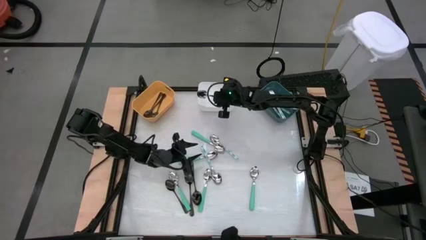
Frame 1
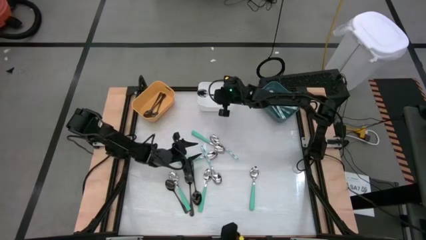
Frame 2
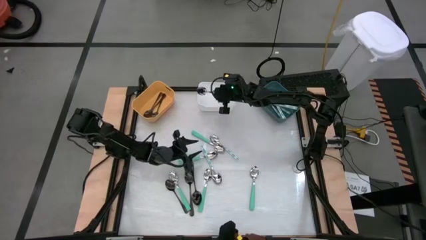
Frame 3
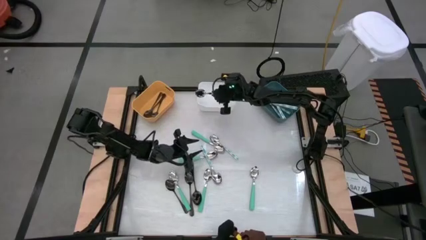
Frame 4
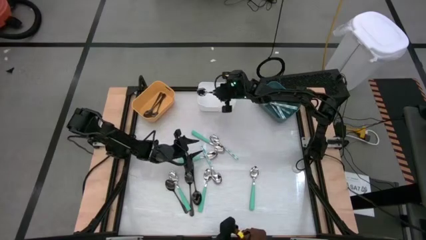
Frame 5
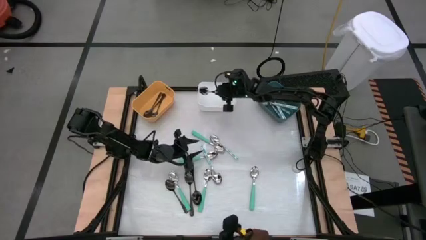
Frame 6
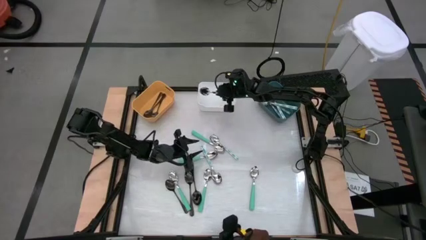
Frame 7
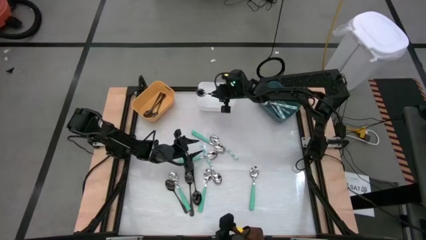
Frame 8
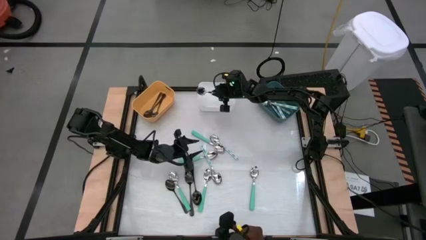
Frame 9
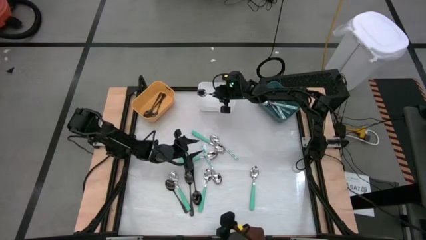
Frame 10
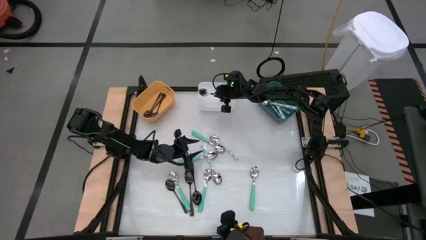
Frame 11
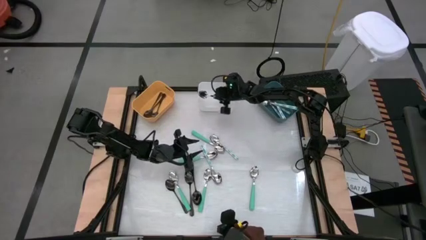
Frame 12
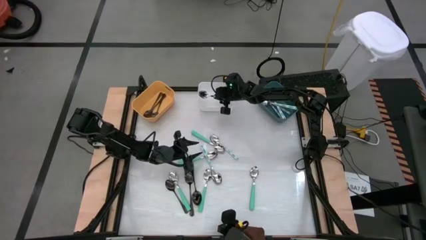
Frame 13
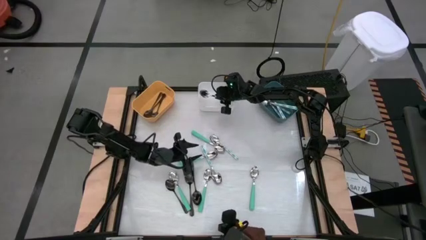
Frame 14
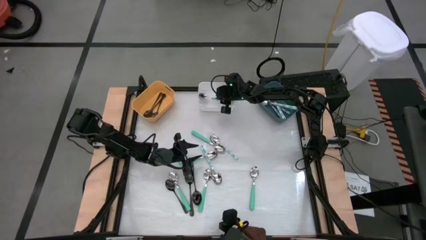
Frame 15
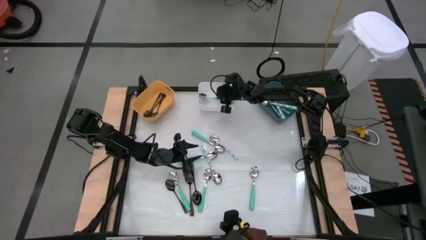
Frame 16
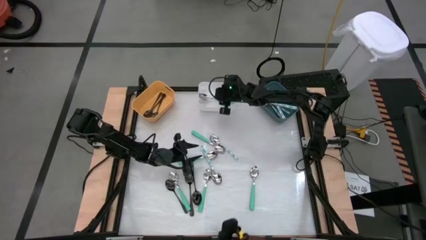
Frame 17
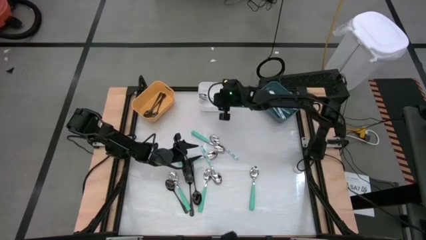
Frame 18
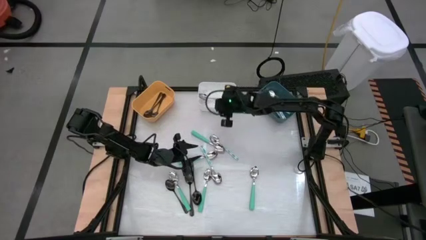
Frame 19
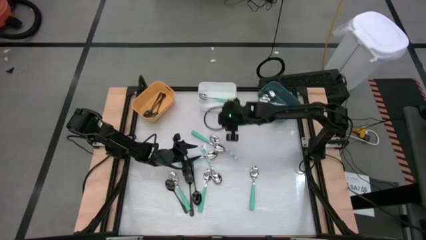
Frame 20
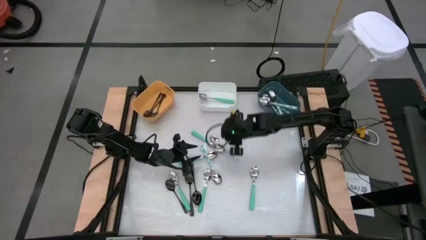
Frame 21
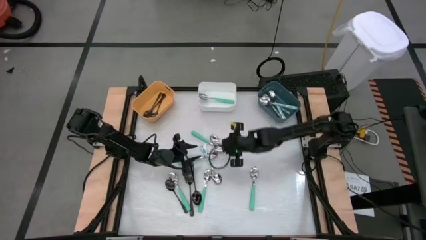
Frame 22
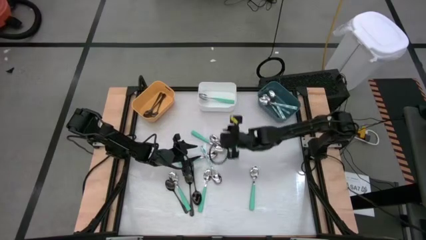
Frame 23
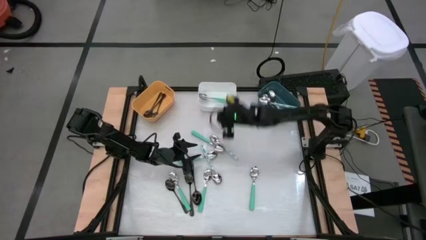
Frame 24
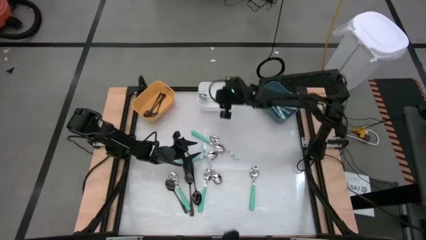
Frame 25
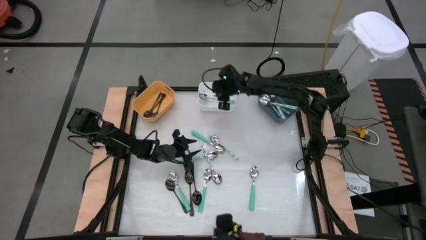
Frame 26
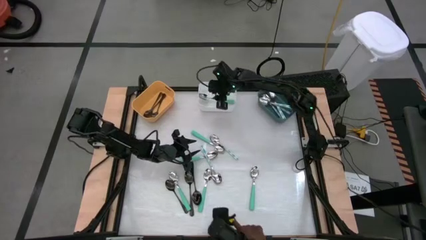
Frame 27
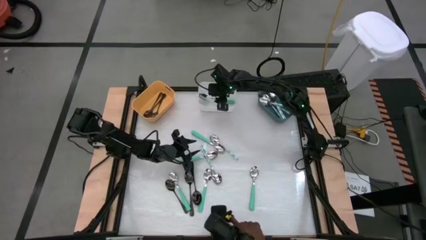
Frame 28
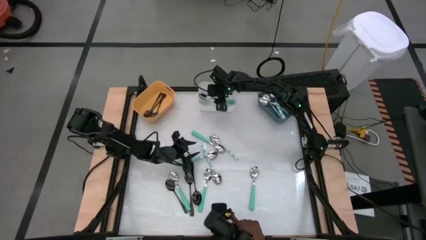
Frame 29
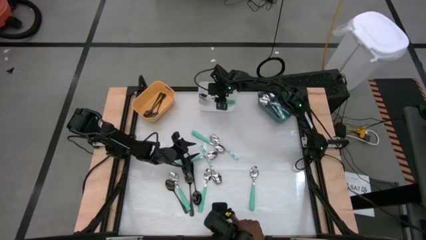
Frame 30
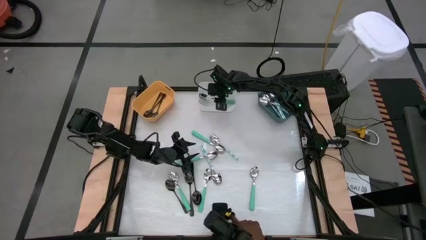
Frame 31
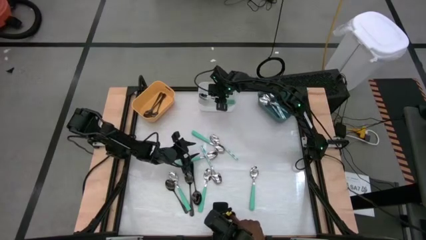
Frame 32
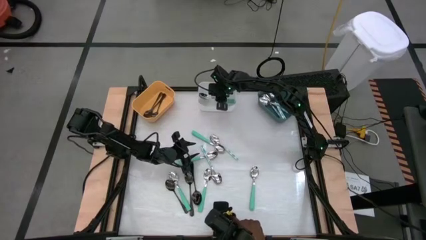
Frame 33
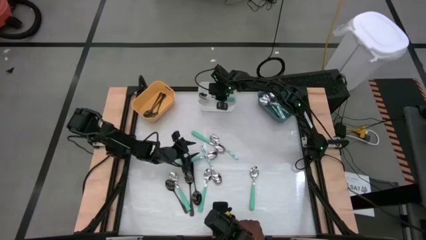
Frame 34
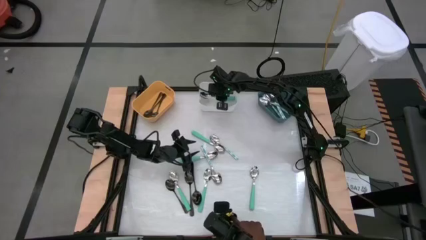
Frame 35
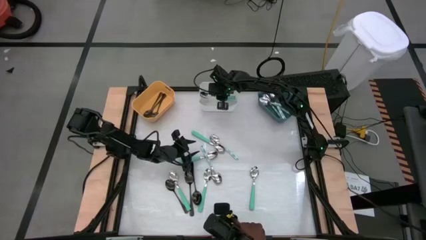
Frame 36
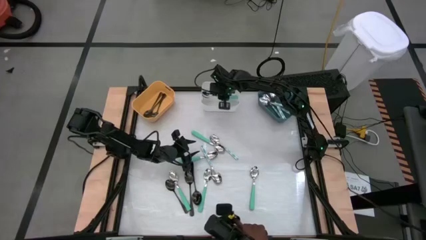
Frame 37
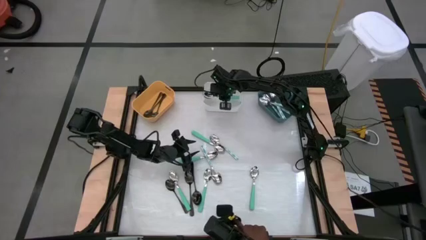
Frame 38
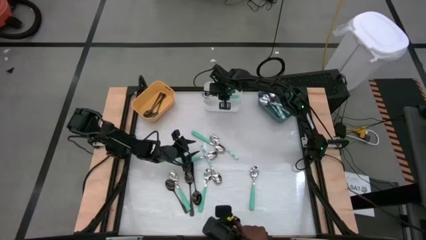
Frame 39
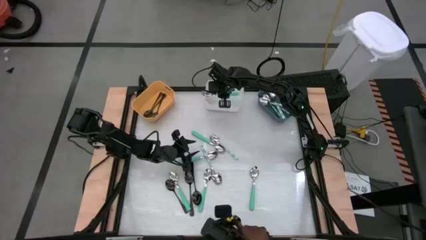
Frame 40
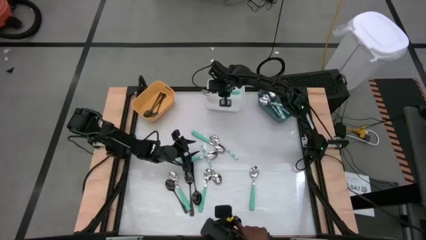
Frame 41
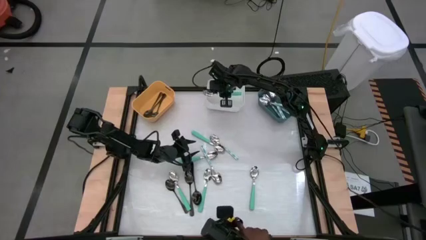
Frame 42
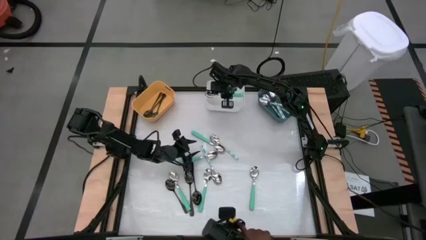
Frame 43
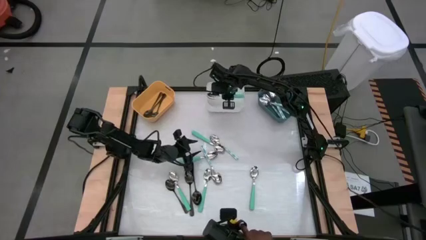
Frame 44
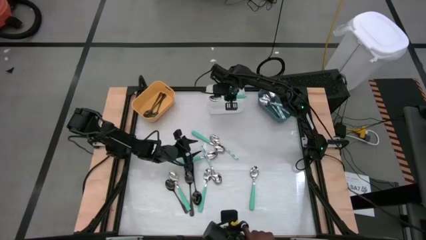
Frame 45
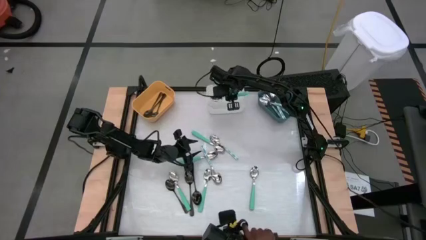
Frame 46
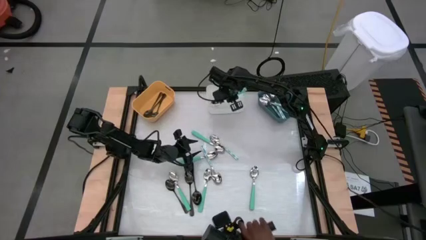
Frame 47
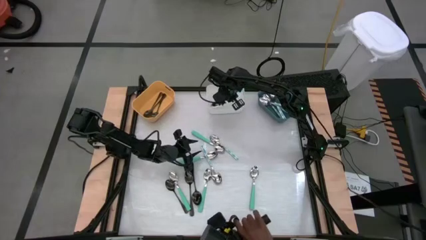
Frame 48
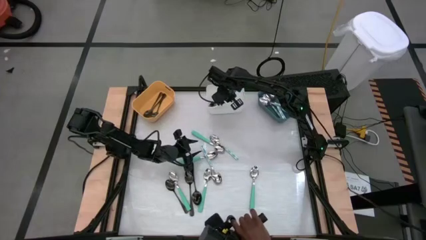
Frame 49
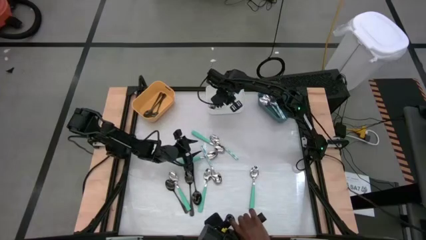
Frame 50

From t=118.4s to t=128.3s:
Task: Sort silverware by color (type)
Put the blue spoon into the white bin

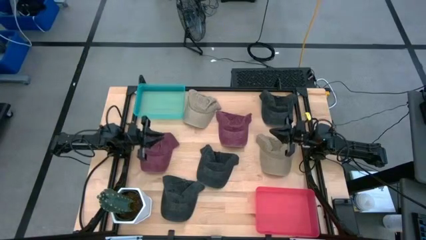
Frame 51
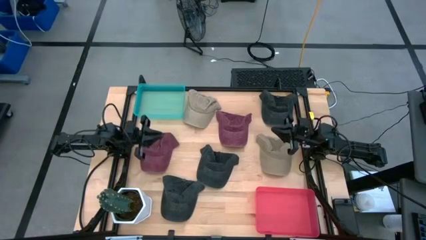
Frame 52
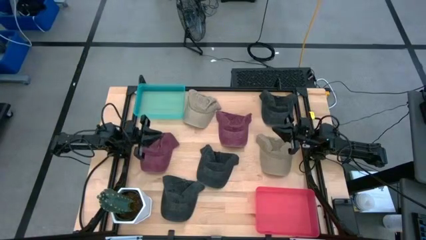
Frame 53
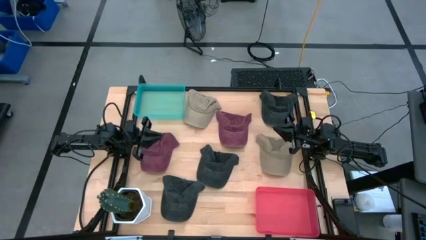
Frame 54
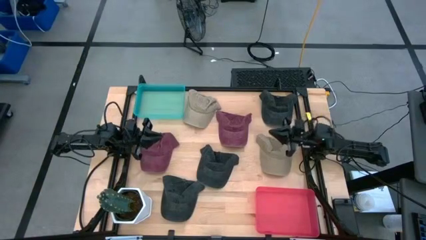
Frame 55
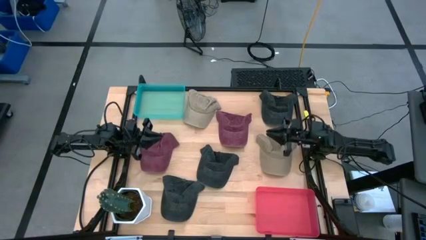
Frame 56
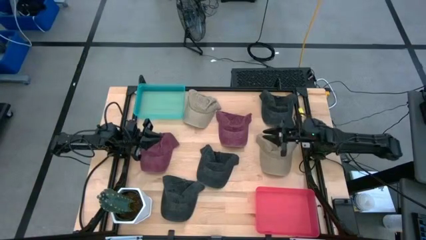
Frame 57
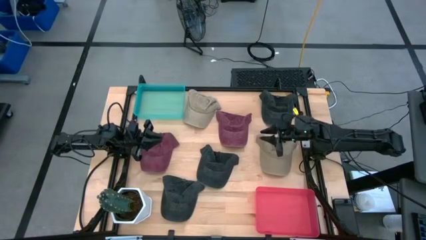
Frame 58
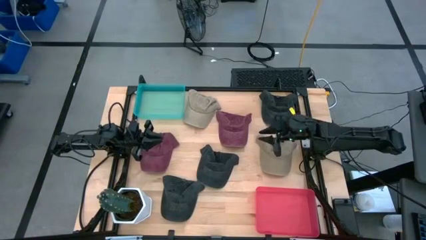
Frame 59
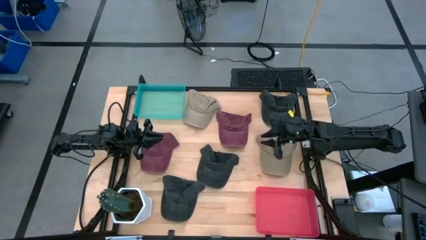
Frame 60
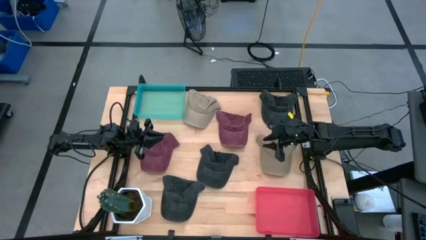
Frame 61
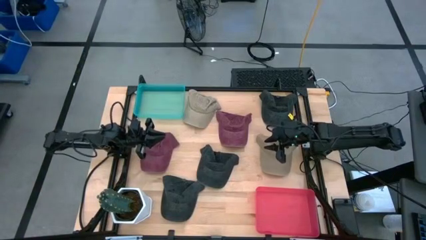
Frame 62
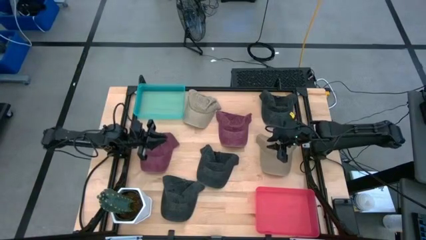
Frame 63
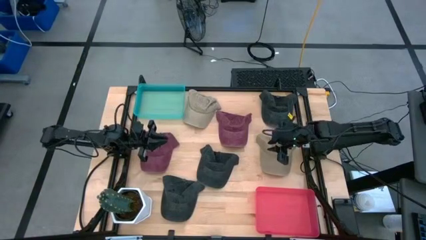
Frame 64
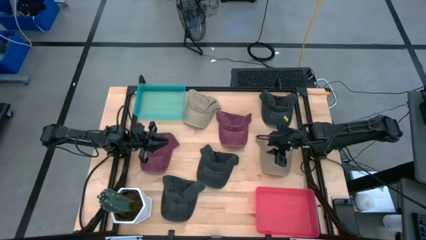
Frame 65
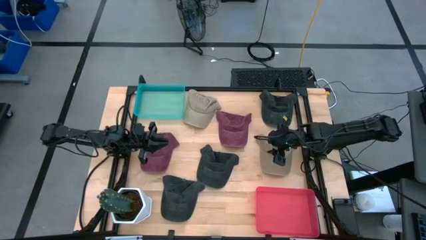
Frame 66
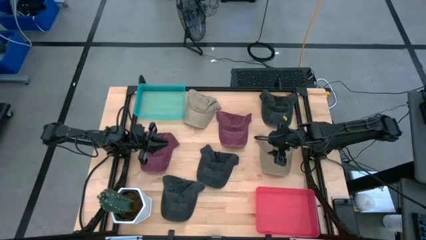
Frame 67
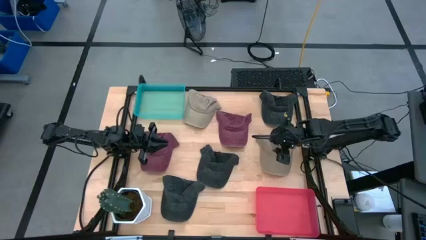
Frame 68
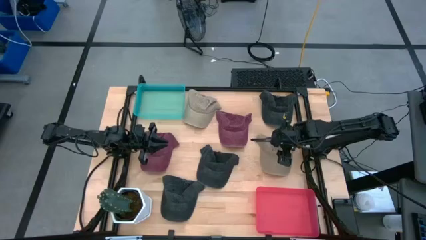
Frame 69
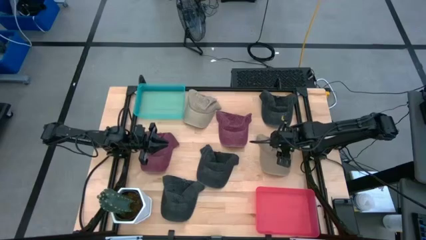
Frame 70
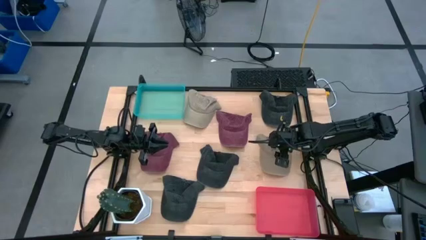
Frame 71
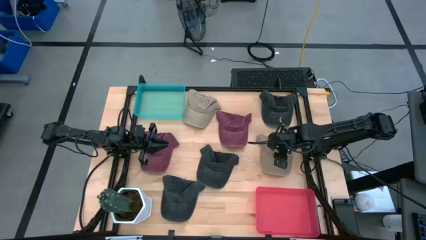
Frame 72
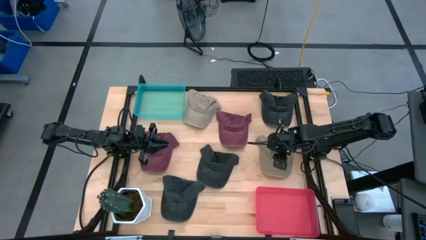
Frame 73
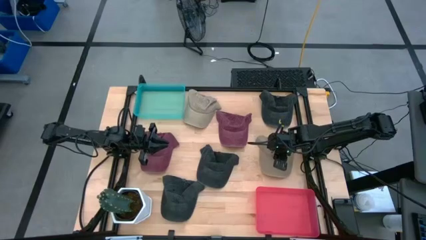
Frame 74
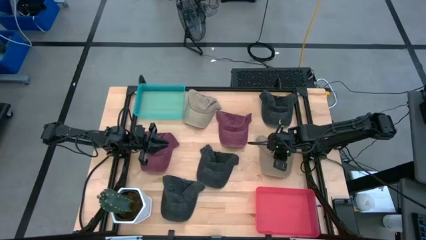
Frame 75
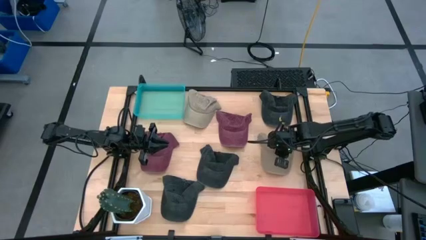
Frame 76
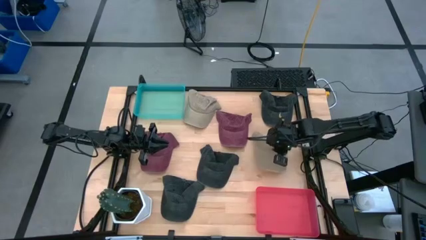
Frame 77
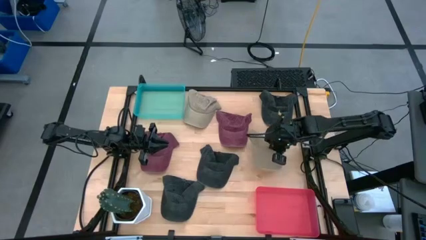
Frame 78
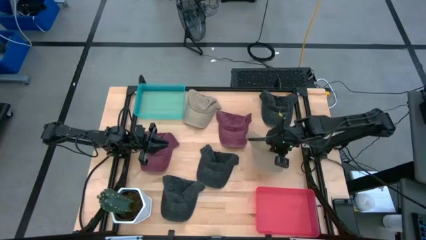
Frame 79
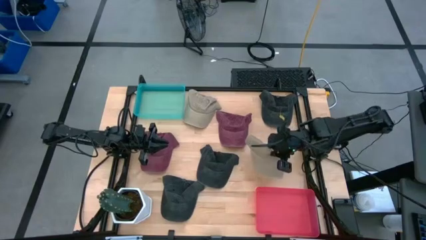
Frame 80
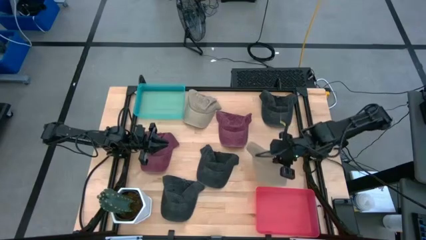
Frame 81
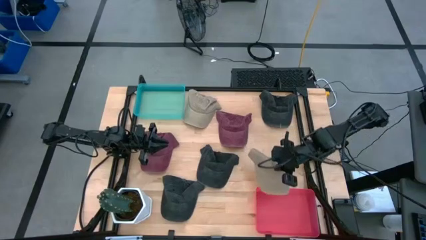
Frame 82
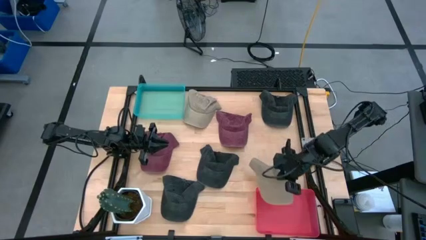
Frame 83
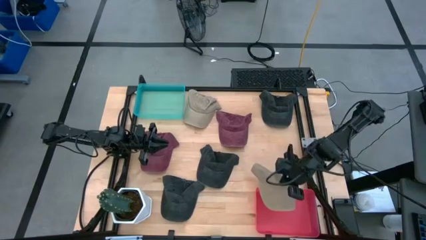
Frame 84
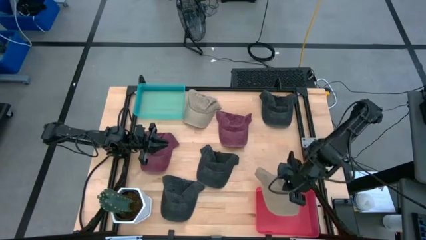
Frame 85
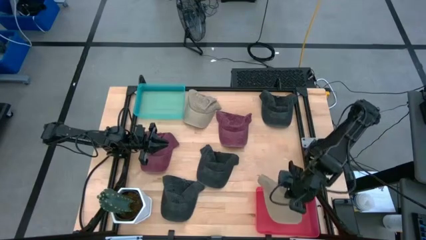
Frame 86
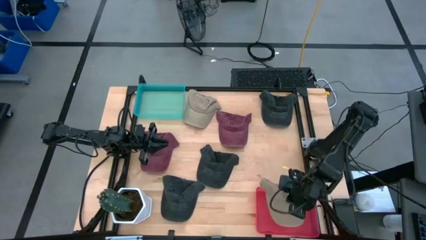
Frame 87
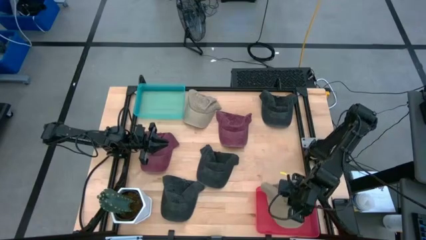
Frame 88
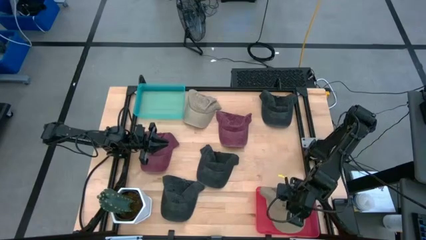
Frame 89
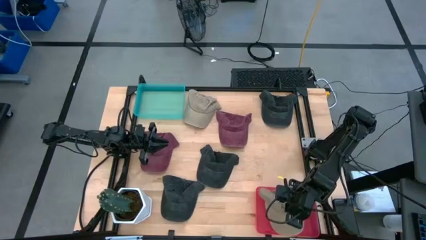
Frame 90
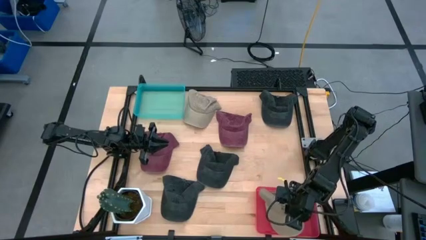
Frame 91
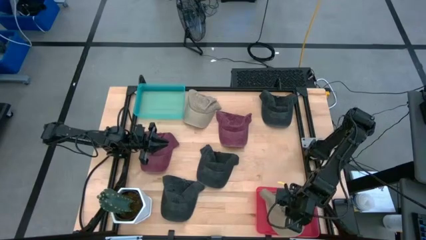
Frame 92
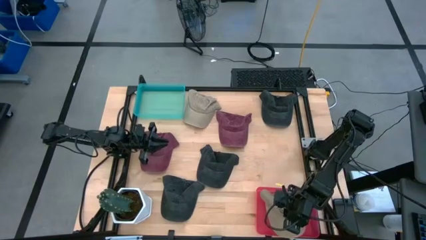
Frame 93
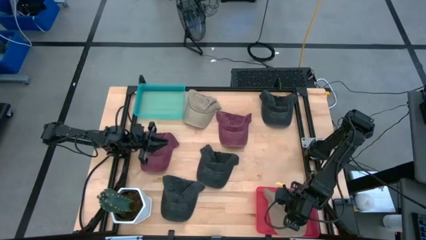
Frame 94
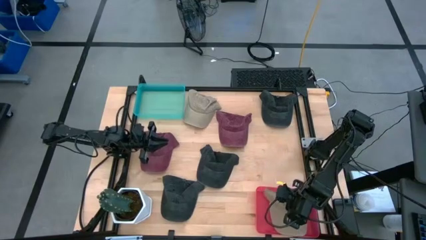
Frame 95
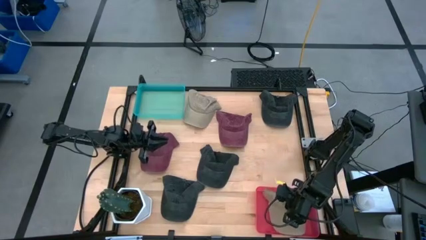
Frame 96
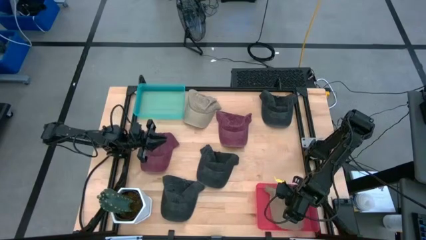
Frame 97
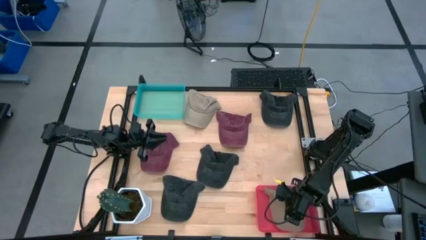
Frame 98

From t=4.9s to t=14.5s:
Task: Pick & Place hat
Put the bottom brown cap into the pink bin
